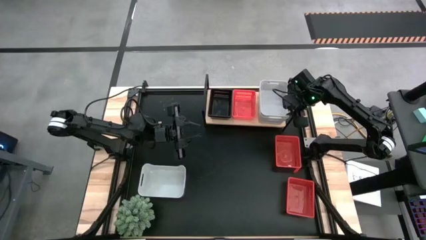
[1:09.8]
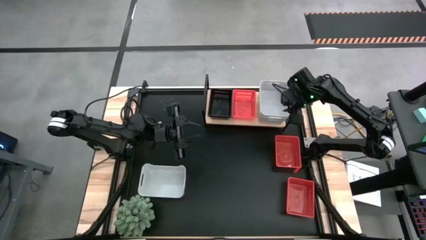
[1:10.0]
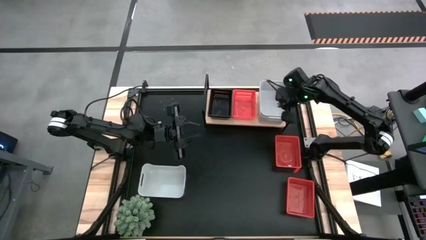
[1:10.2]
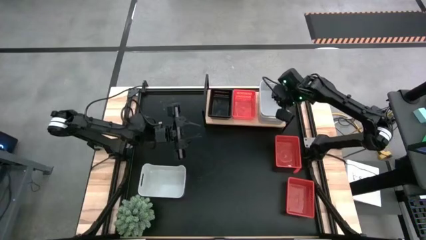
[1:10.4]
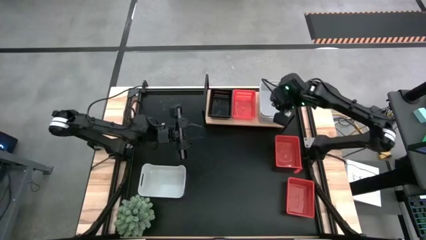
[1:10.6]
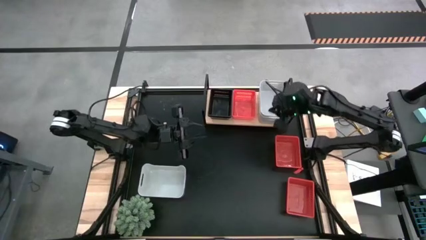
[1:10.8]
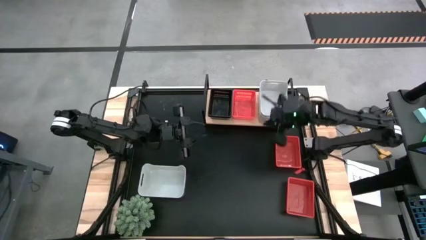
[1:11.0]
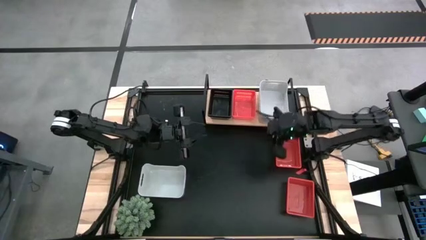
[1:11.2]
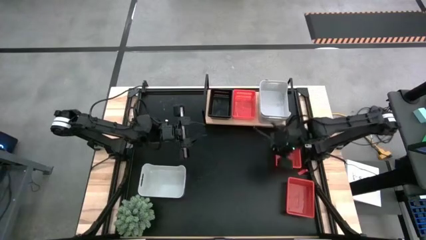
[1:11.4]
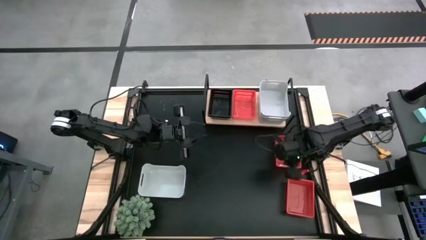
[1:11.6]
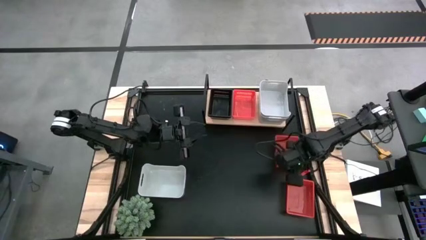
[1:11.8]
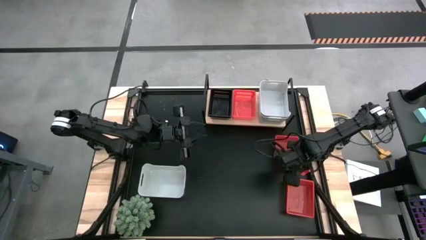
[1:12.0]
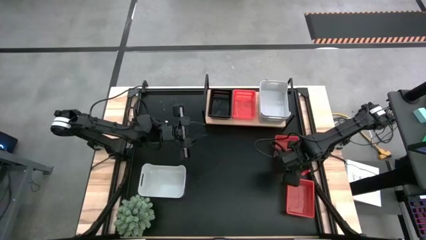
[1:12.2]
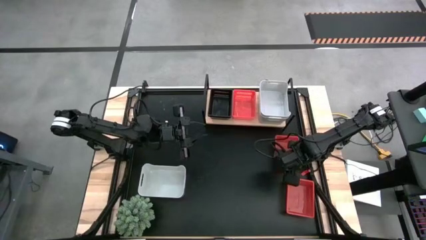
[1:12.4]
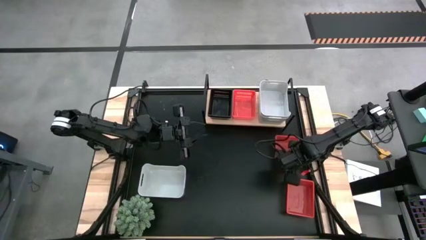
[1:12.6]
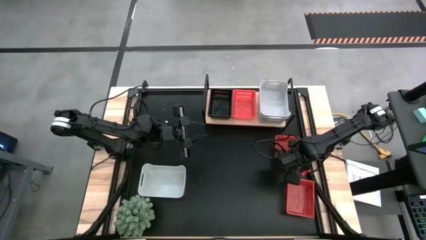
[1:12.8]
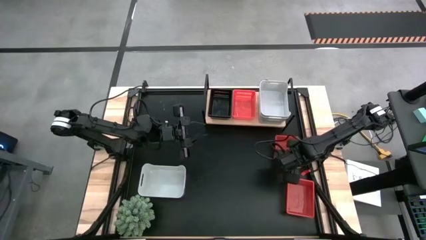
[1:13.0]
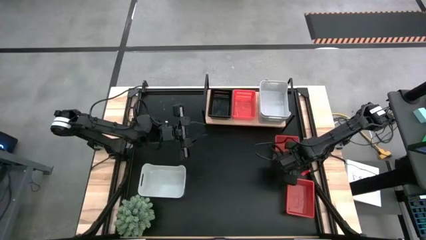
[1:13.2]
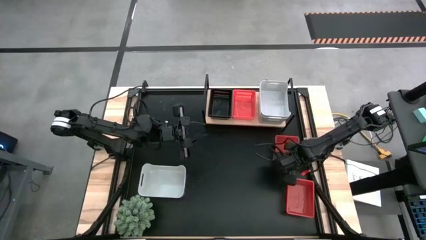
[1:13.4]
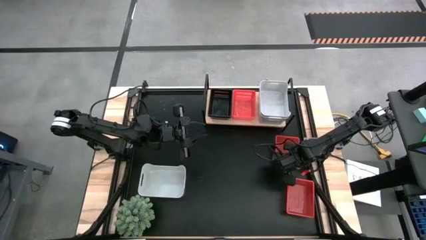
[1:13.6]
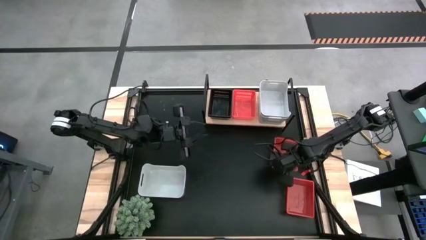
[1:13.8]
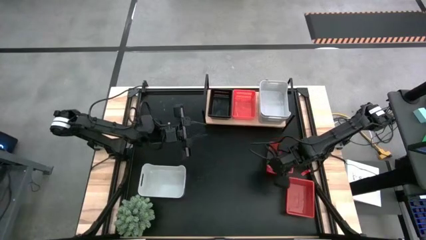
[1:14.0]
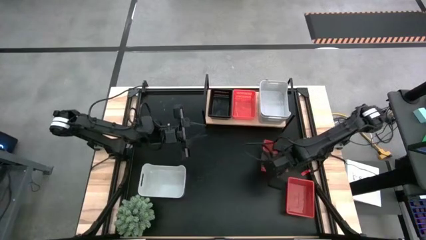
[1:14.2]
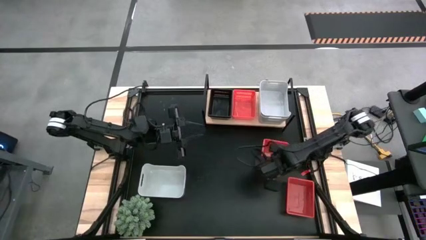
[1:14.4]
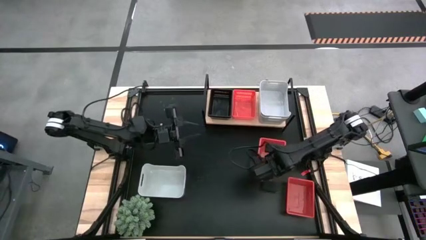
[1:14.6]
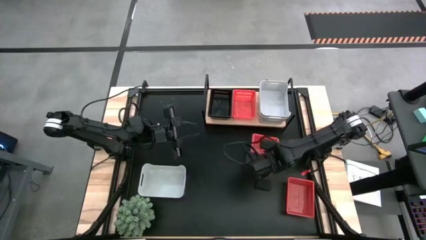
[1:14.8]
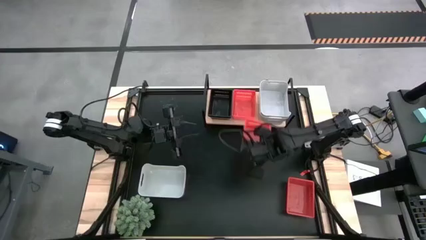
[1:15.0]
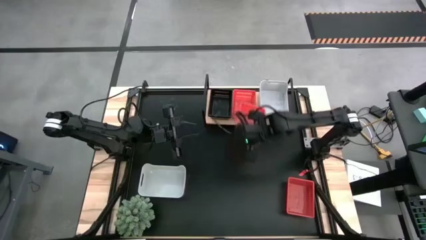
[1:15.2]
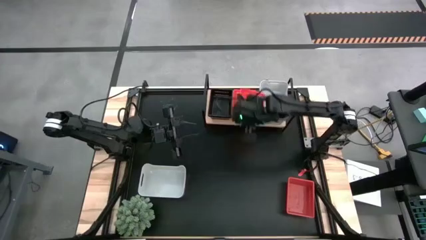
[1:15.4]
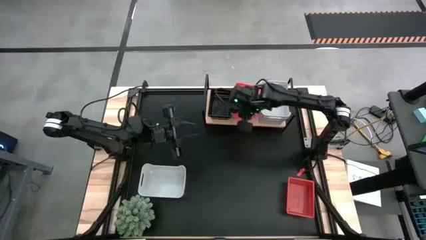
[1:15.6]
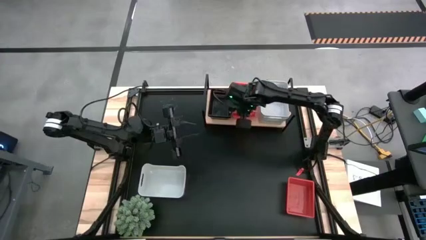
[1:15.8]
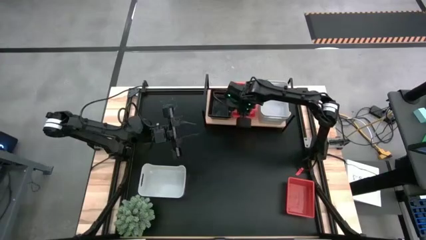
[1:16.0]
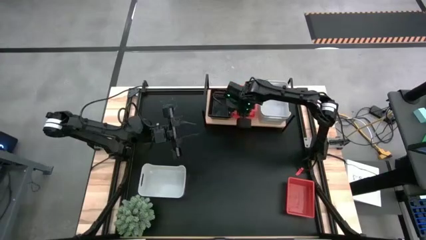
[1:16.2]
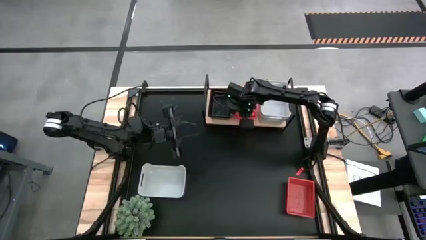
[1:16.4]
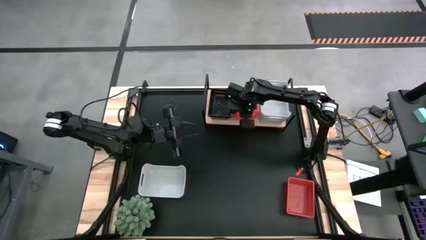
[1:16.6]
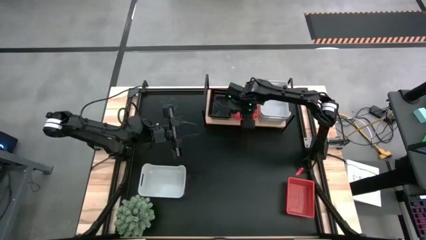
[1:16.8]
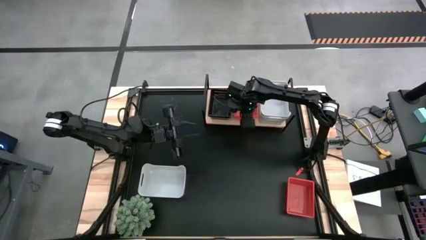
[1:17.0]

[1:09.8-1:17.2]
Task: Stack baskets on shelf by color
Stack the top red bin into the top of the red bins on the shelf

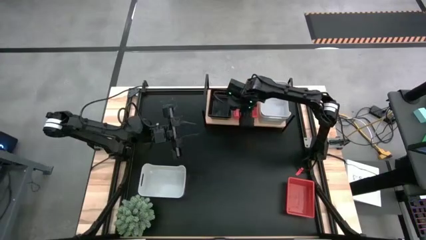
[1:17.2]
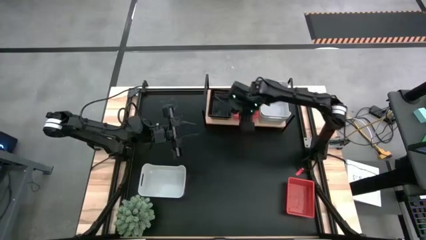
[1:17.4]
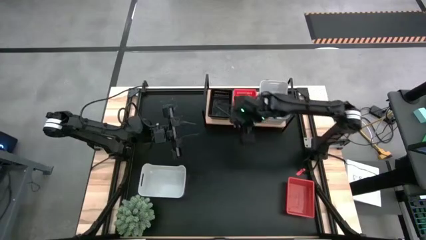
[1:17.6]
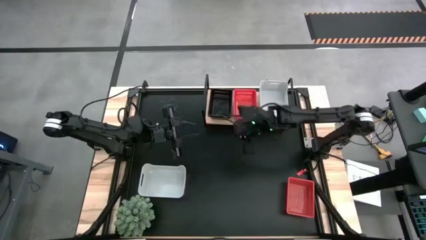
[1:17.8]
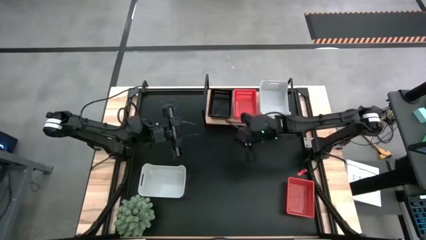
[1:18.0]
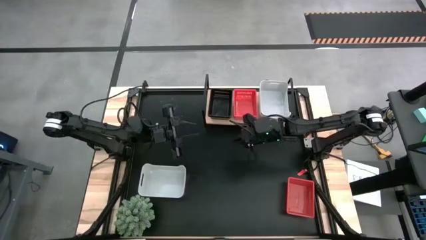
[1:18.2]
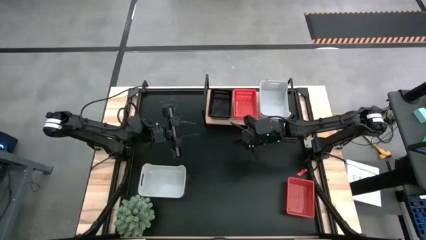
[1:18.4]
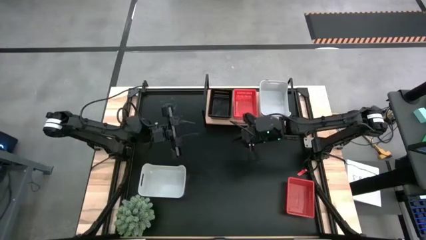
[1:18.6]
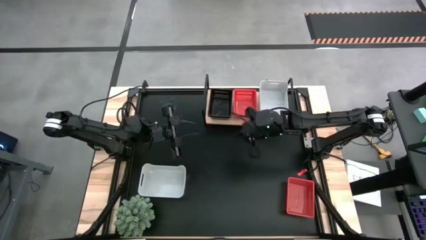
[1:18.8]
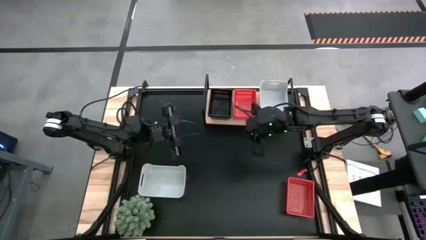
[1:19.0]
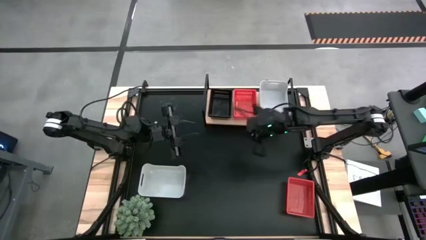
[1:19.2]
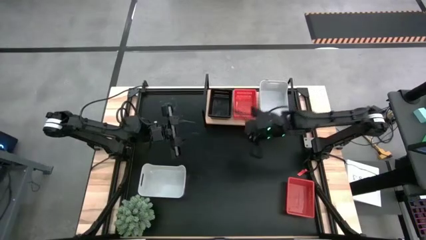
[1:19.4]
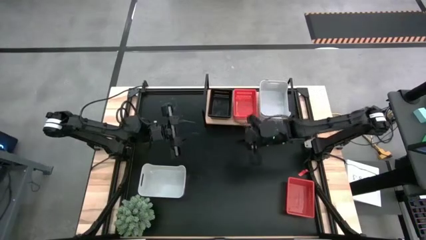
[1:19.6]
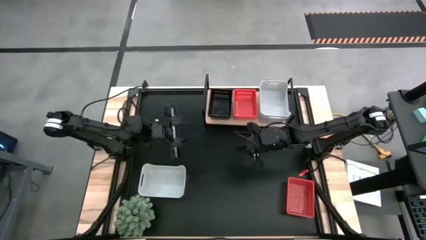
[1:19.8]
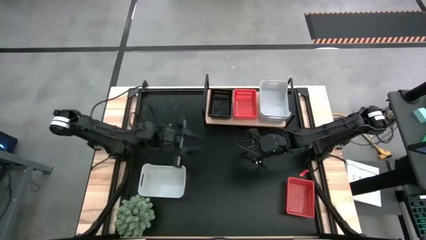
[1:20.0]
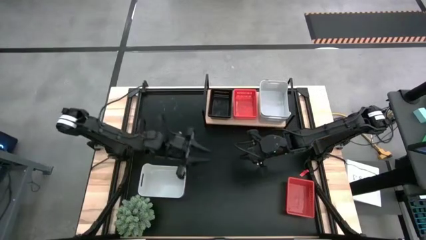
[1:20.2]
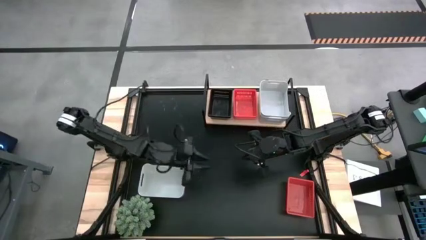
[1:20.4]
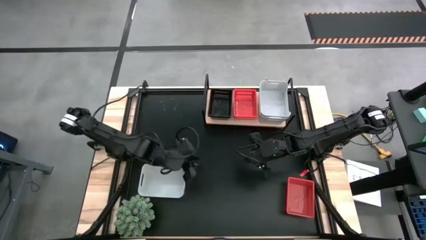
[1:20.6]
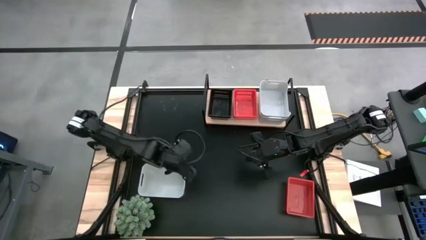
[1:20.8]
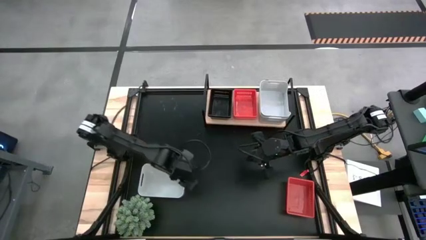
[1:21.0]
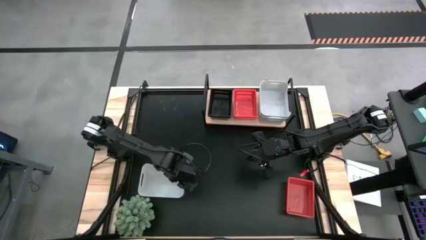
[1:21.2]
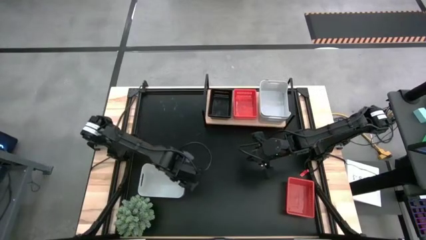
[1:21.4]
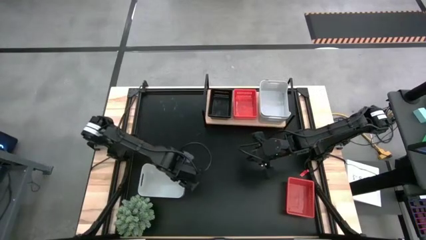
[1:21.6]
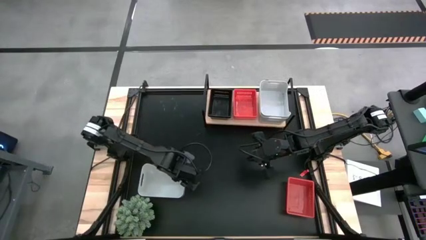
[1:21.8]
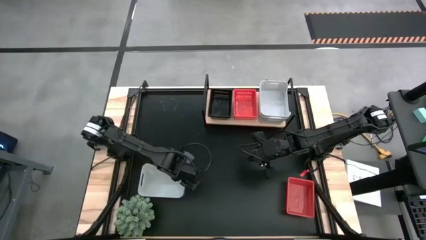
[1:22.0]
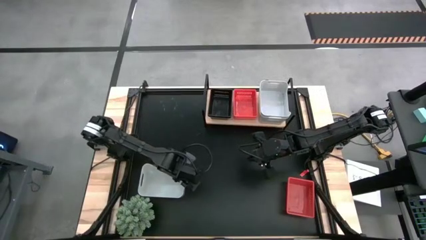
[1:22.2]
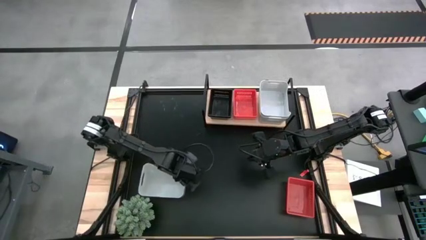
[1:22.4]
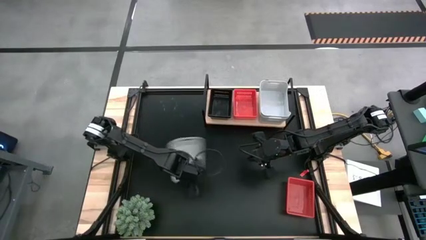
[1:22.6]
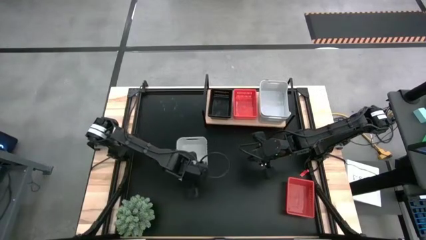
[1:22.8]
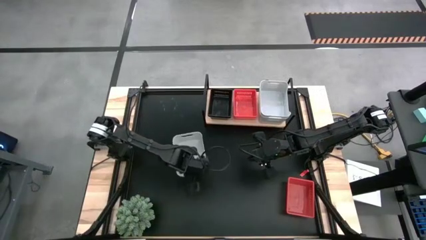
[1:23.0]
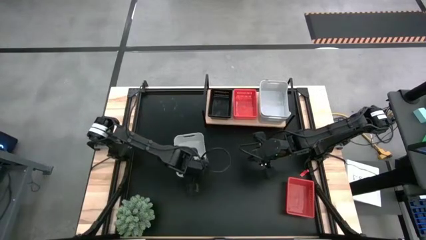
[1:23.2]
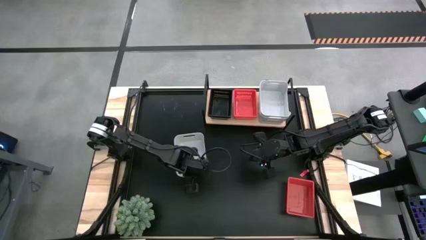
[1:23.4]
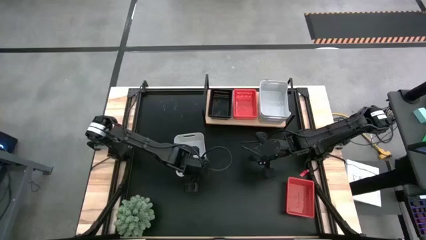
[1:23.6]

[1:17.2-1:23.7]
Adjust the white bin on the table

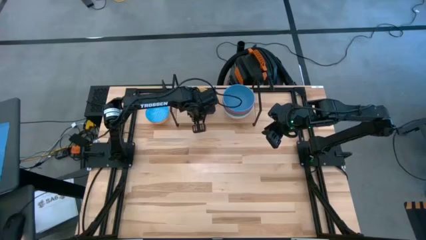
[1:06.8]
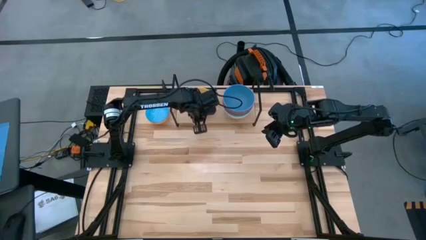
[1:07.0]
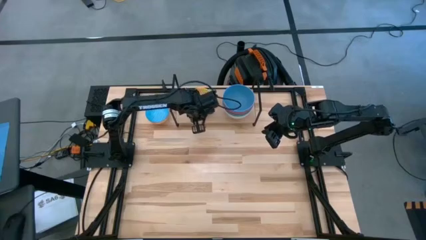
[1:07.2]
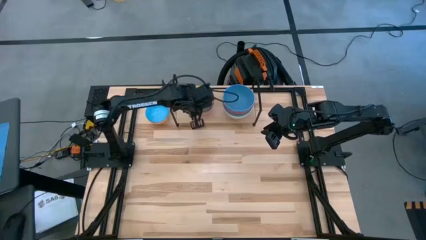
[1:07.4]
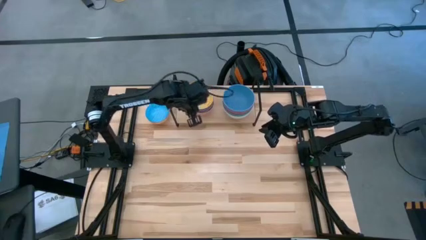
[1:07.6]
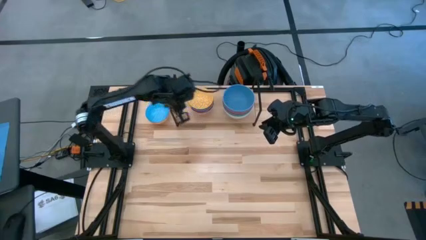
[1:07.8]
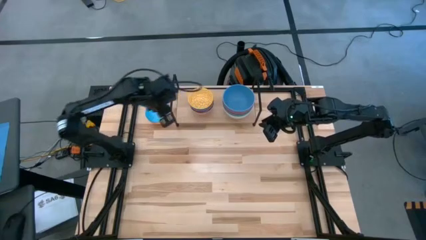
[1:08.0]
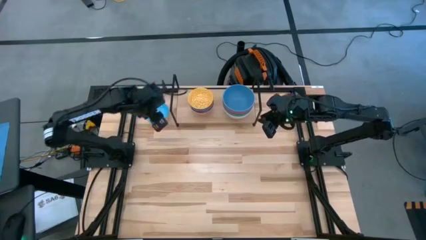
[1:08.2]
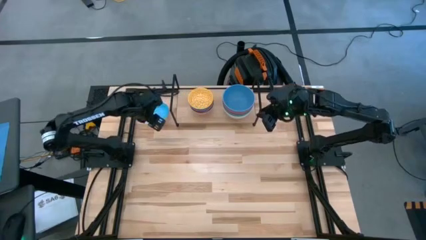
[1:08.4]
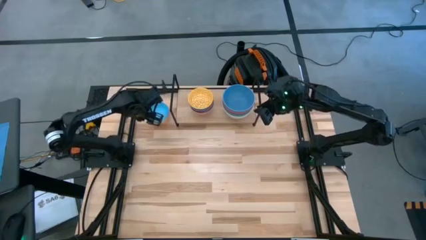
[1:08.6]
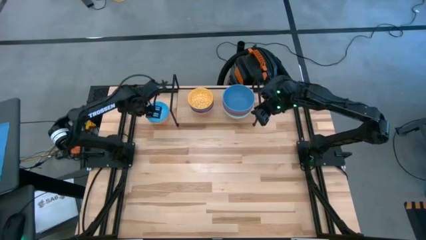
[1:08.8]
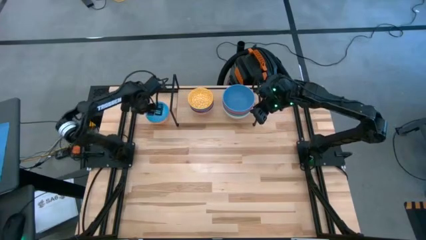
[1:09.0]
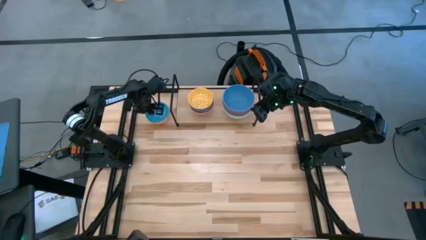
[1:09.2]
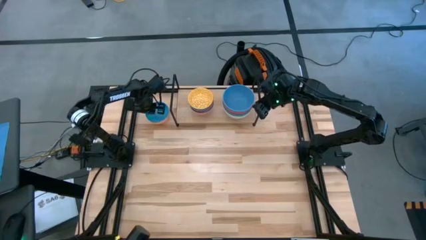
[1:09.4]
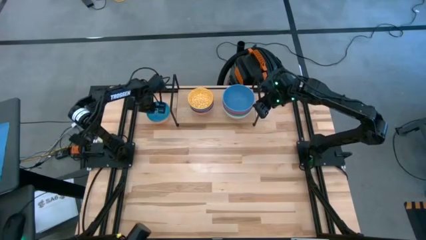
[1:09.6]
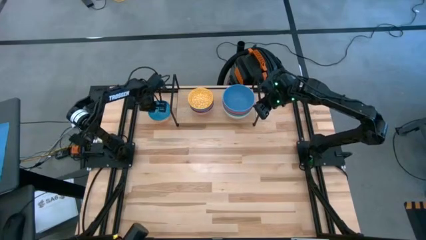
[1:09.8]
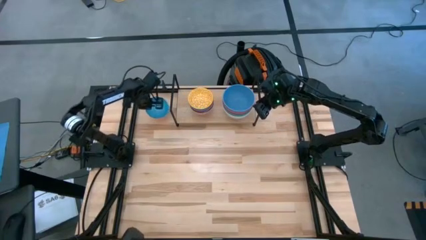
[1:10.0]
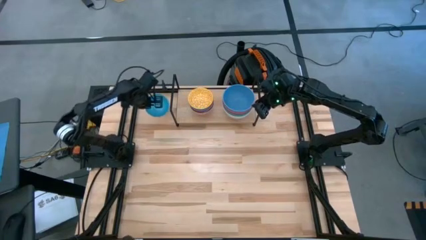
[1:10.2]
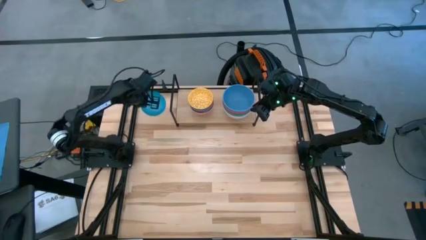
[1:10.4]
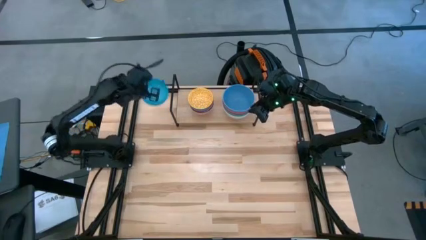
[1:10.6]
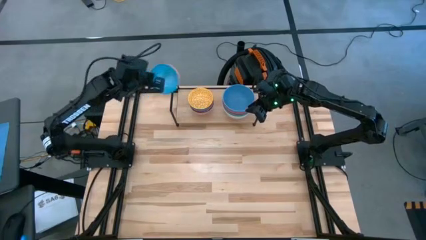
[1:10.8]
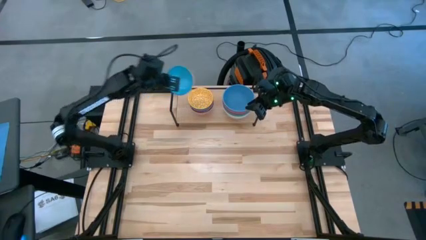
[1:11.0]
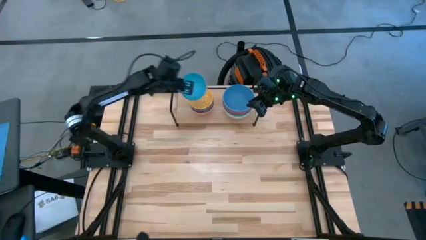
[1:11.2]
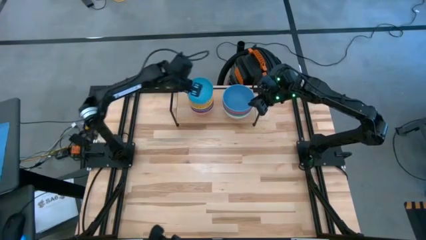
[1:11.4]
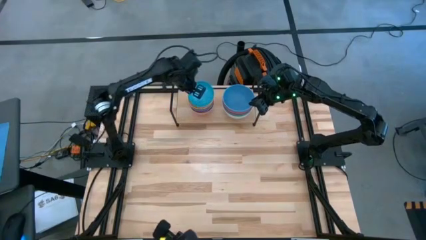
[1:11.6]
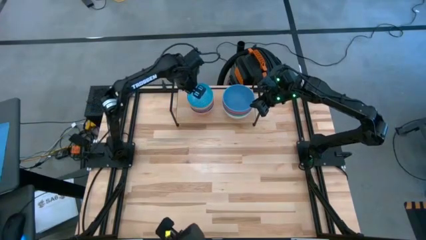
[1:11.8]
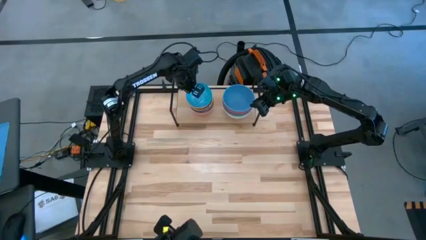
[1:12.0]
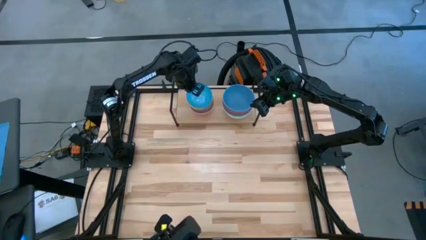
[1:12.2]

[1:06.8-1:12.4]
Task: Place and stack bowls onto a shelf
Stack the small light blue bowl on the small yellow bowl on the shelf
